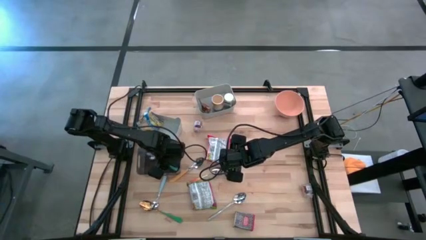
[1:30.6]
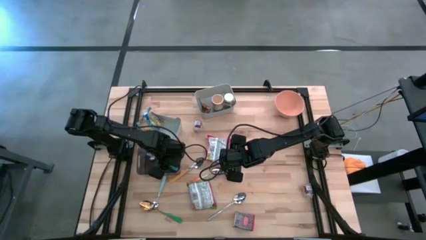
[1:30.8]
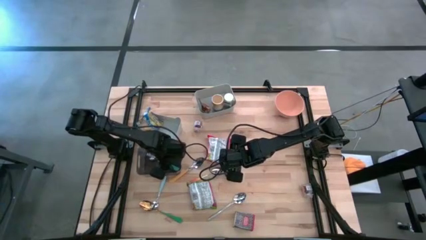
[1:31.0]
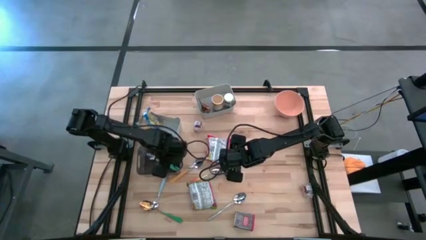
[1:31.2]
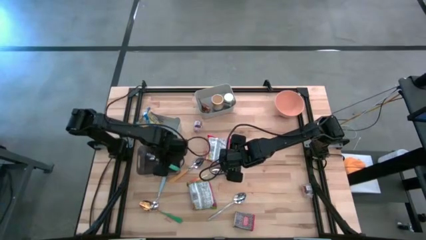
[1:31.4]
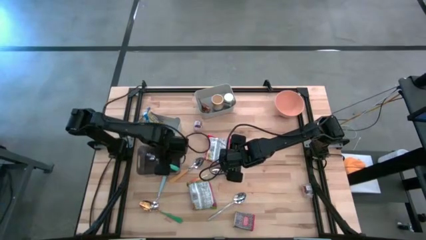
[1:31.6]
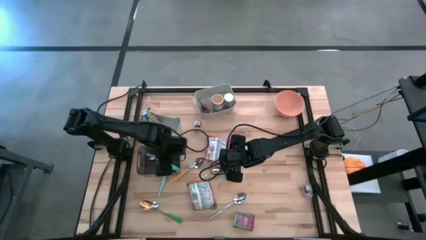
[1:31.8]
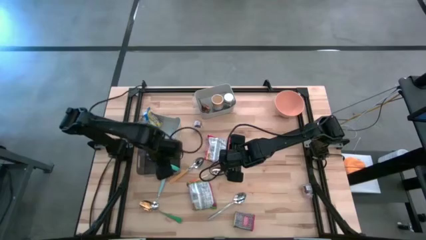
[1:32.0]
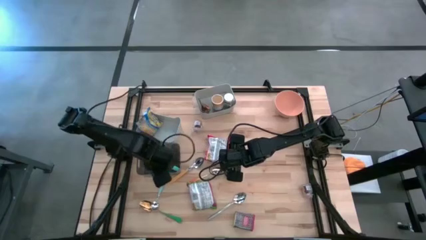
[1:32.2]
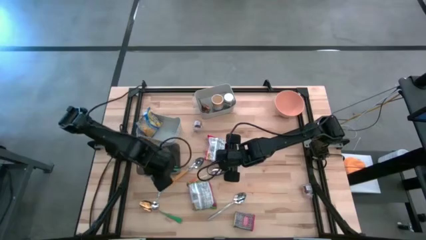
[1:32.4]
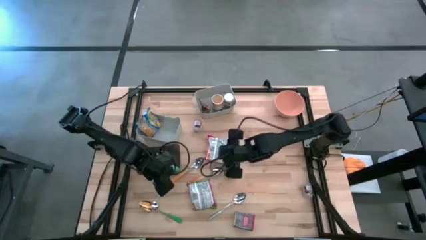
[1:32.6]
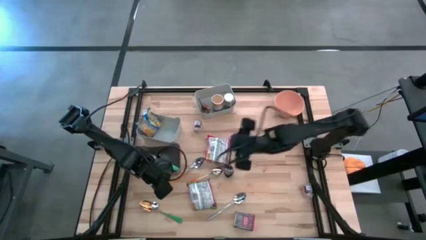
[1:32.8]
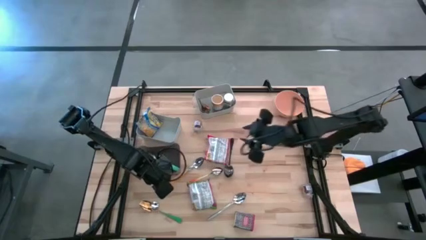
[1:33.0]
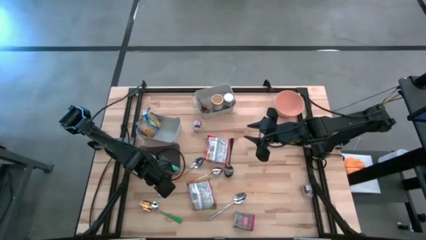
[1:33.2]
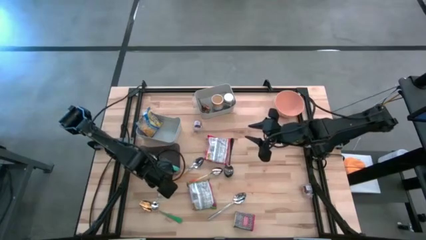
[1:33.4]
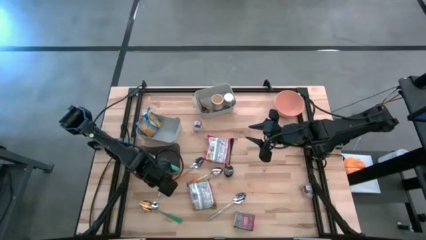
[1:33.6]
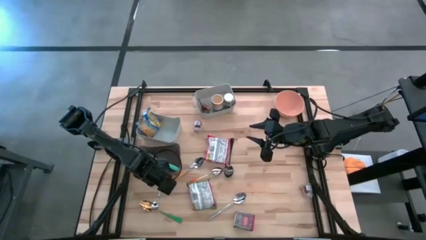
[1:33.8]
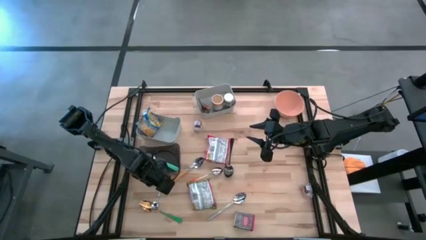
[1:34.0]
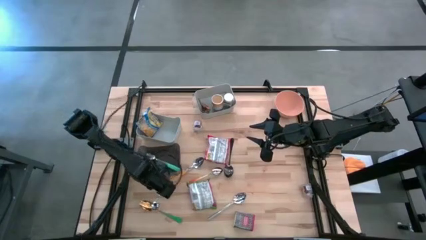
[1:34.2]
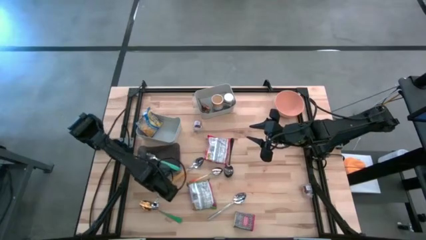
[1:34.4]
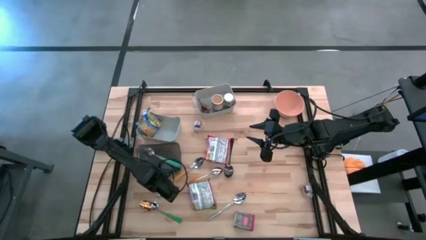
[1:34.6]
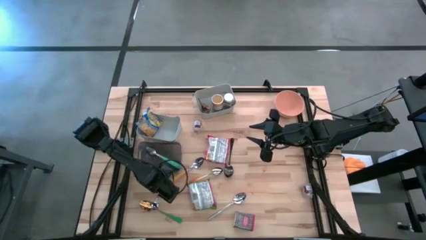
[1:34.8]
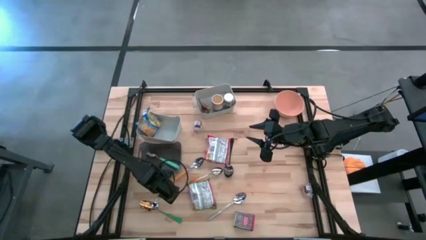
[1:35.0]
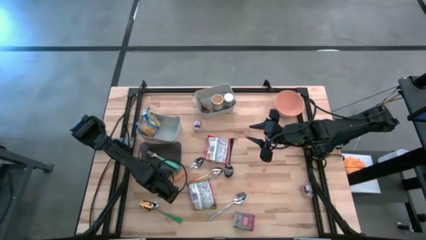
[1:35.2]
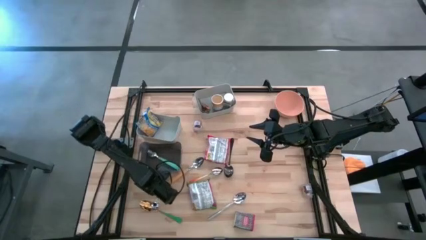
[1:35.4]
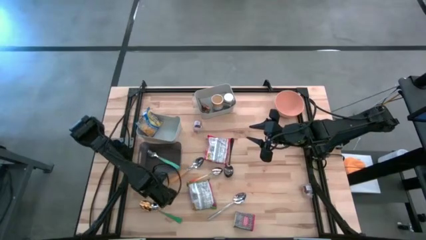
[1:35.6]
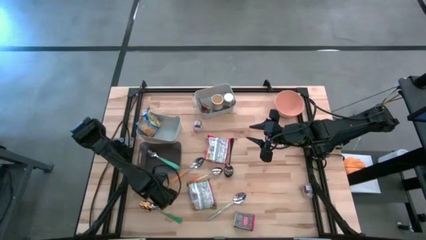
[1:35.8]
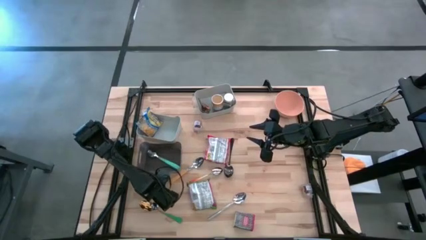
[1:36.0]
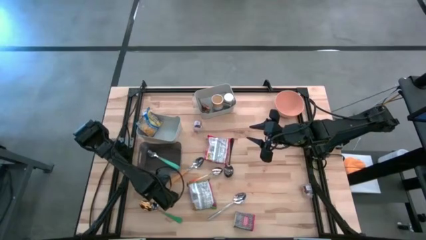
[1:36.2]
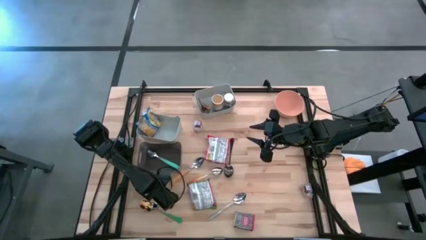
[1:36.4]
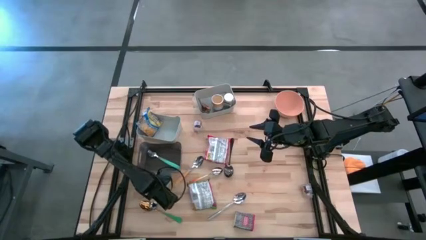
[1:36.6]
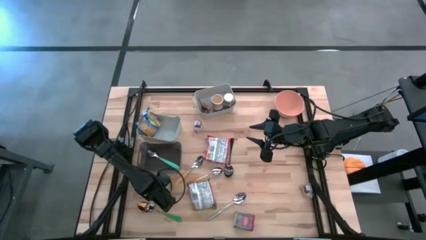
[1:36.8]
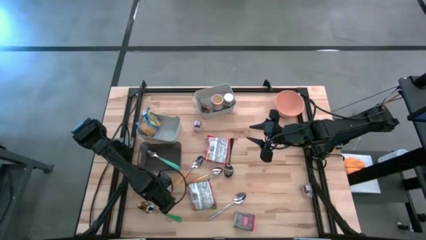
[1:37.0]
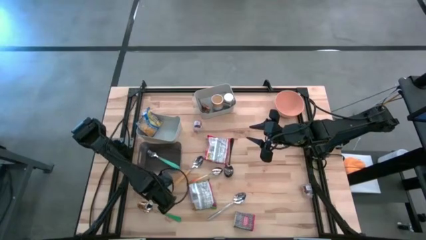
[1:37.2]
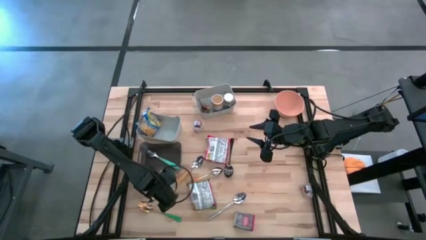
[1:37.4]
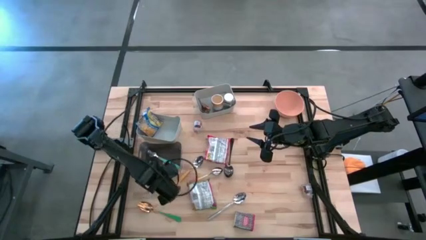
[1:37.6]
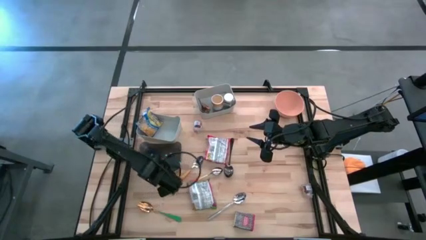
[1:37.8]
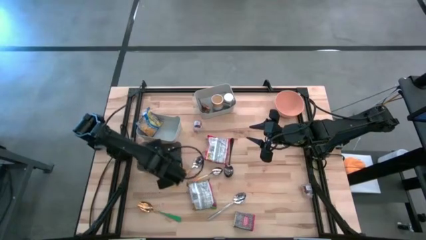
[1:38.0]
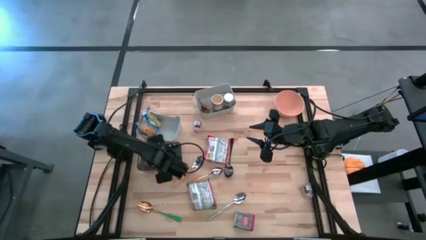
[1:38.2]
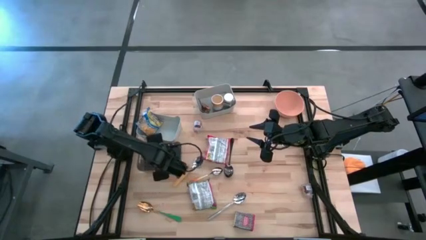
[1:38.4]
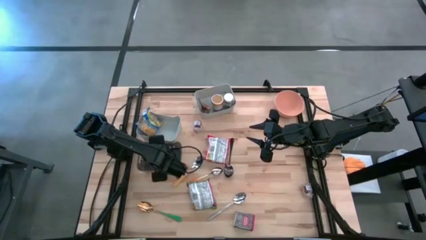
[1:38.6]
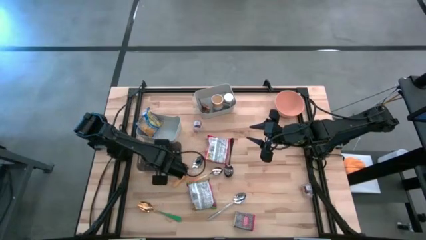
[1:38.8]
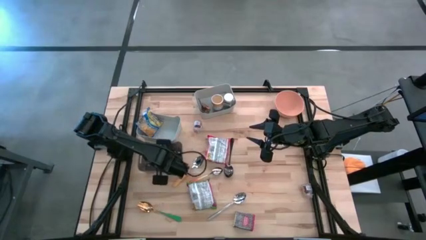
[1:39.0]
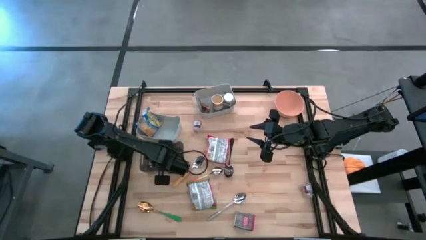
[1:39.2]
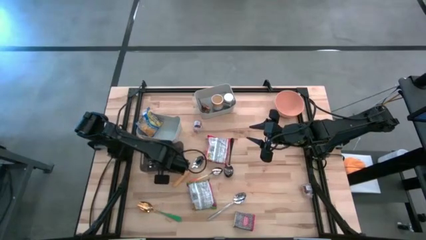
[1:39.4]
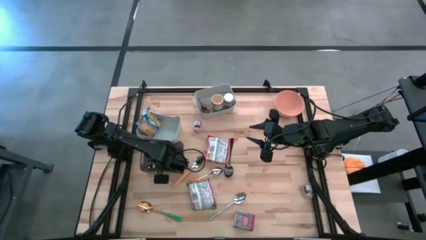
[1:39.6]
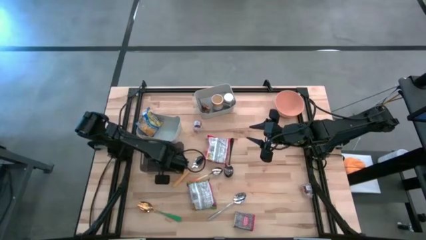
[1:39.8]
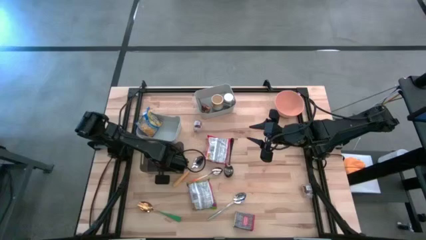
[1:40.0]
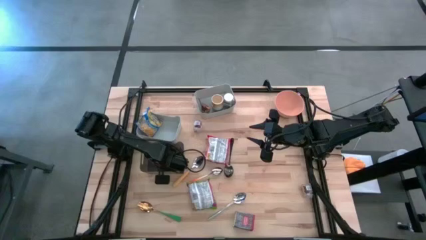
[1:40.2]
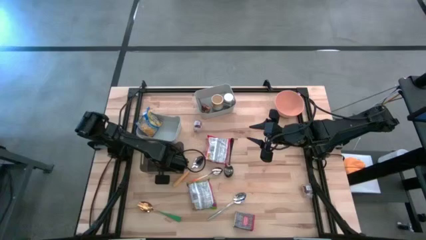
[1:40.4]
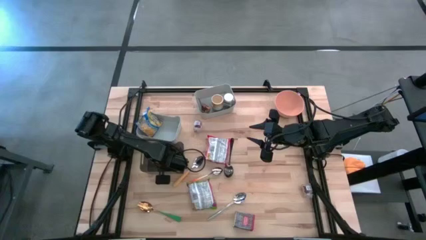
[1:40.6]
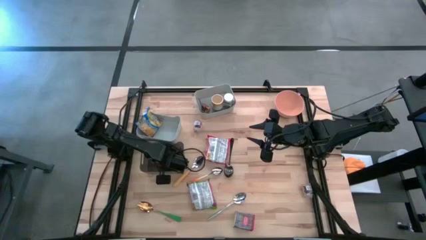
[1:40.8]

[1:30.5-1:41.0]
Put the blue spoon into the black bin

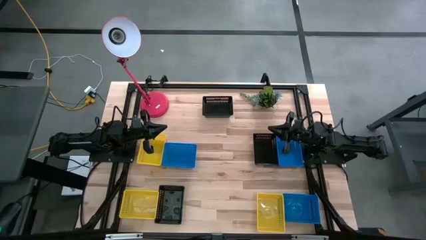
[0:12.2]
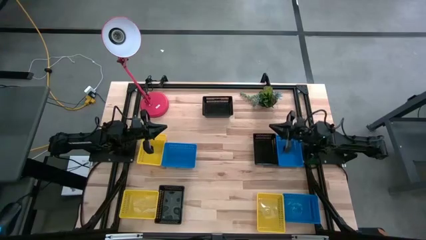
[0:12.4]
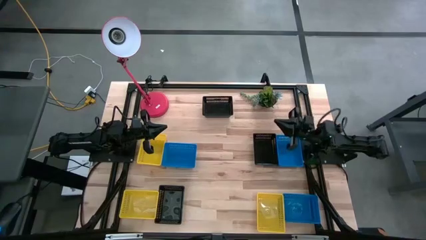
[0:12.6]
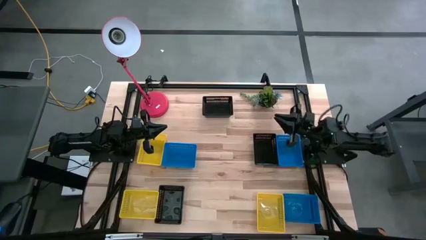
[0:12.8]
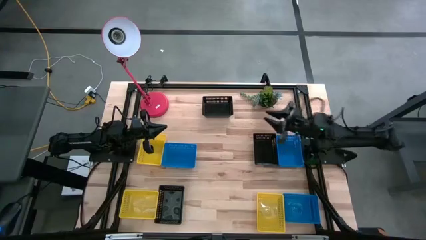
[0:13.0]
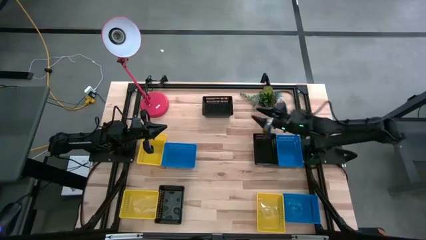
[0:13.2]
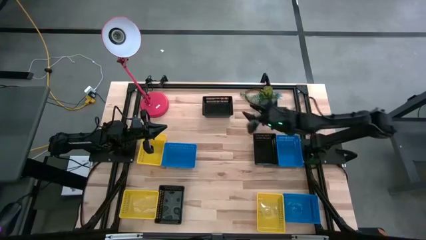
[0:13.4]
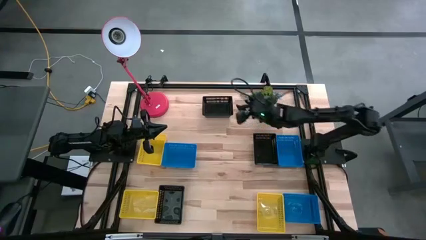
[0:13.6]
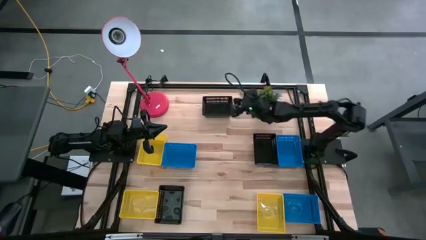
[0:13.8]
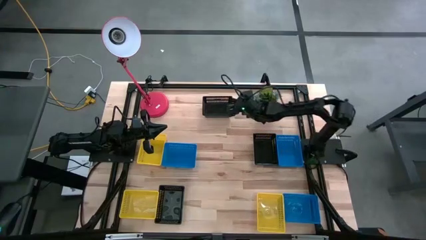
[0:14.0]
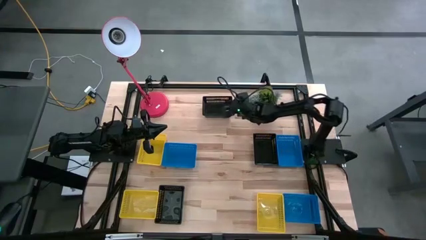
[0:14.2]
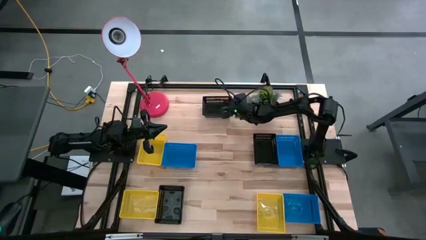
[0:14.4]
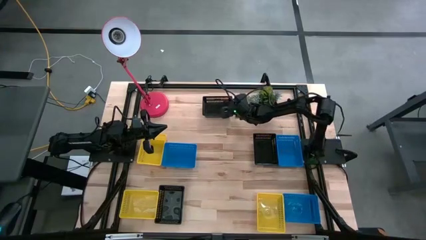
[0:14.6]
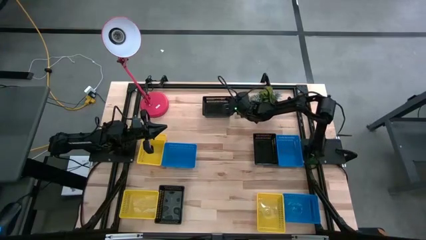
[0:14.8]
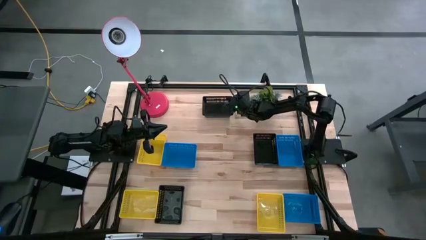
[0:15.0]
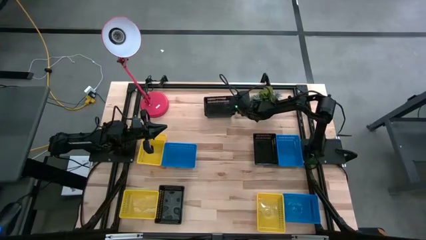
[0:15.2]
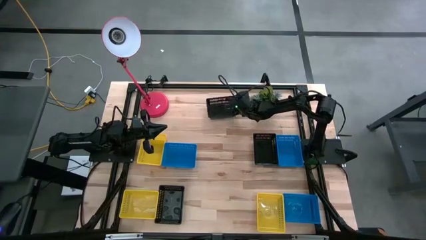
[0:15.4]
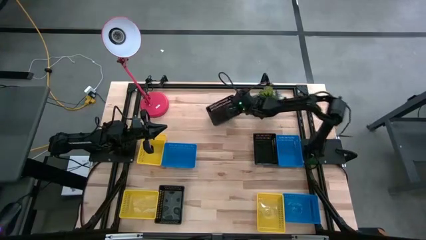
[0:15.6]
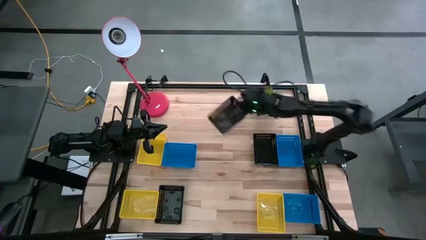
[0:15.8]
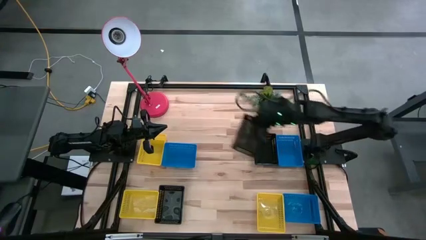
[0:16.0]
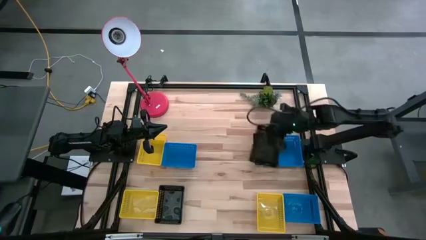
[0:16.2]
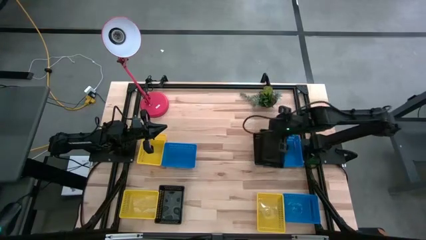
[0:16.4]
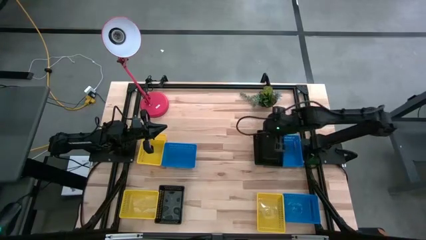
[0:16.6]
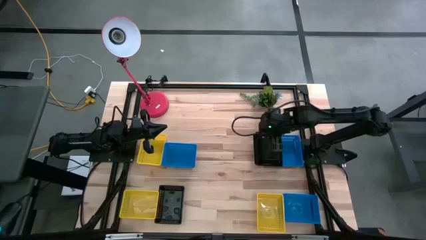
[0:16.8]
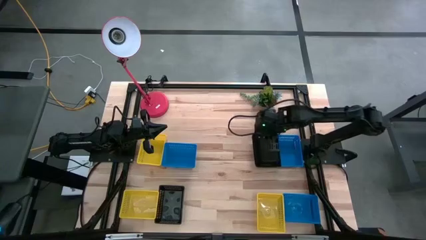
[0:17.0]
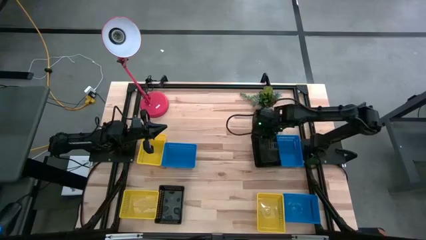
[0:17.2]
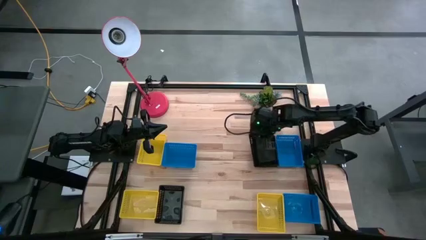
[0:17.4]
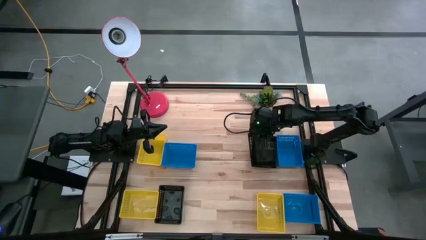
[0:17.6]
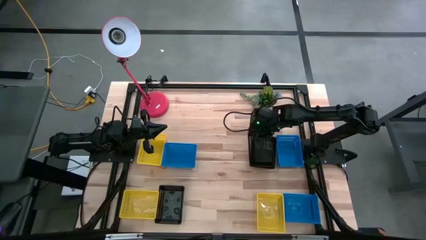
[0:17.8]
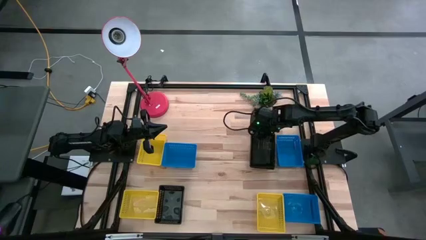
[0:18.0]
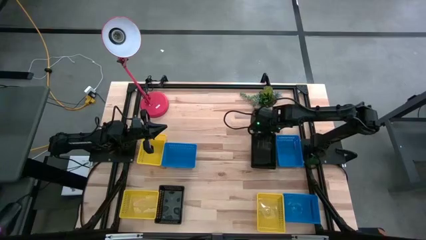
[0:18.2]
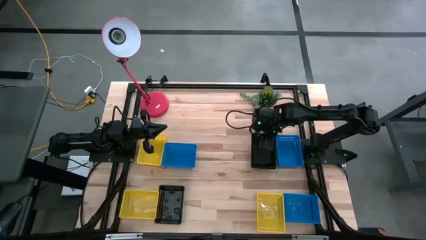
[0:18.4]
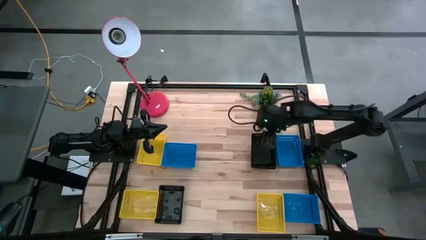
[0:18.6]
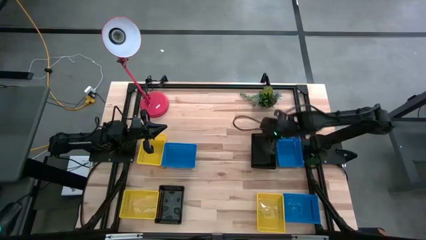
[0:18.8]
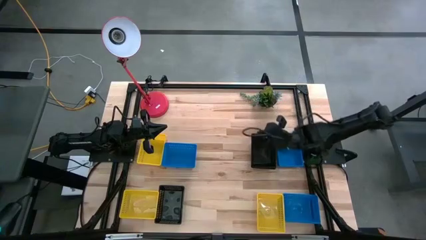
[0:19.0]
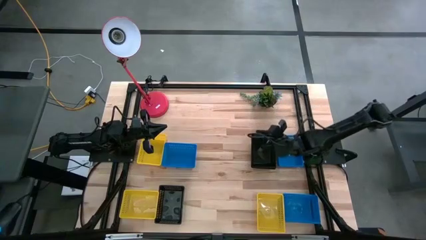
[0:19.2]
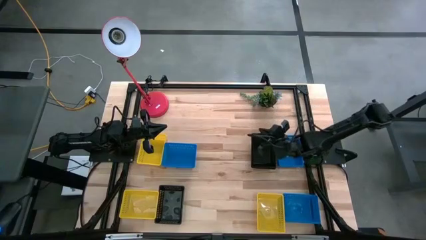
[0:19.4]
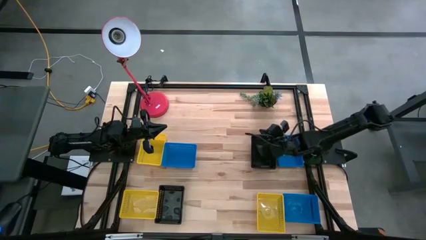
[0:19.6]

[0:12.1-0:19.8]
Stack the top center black basket on the right black basket
